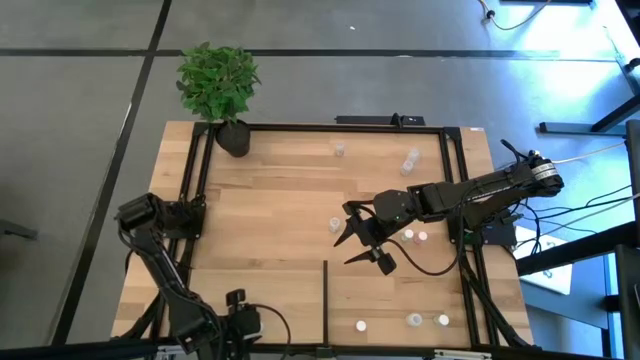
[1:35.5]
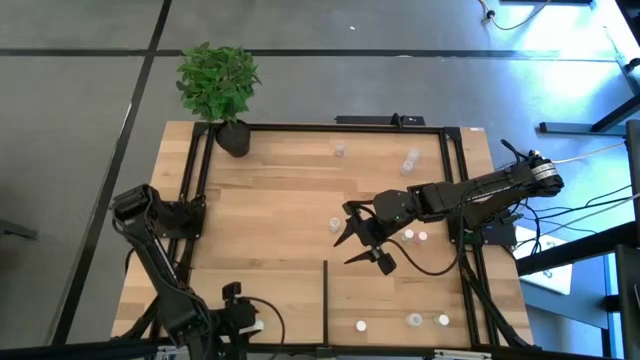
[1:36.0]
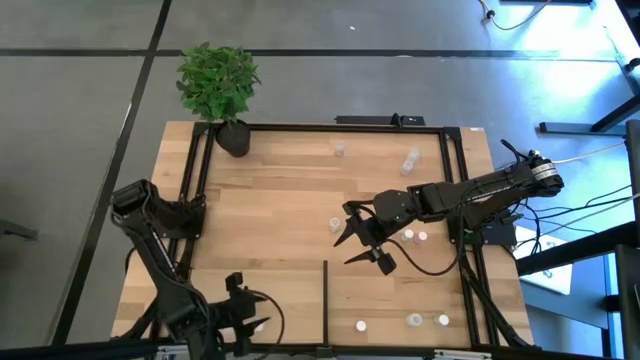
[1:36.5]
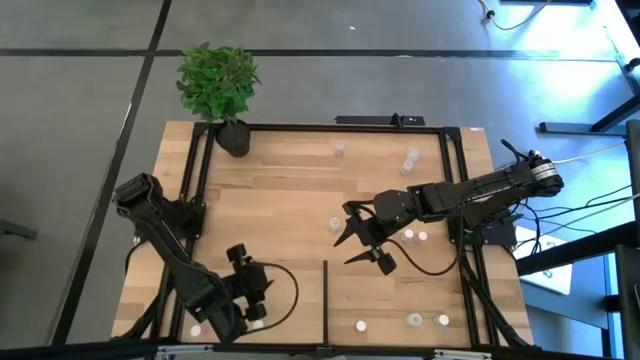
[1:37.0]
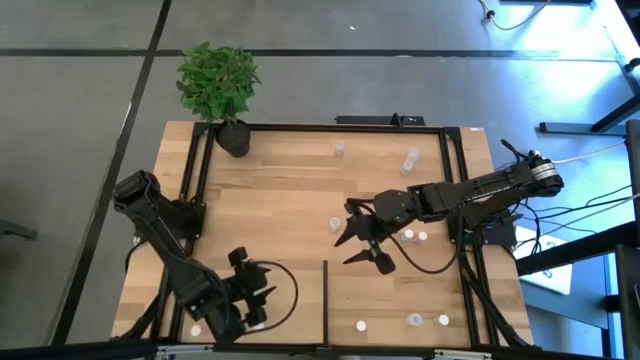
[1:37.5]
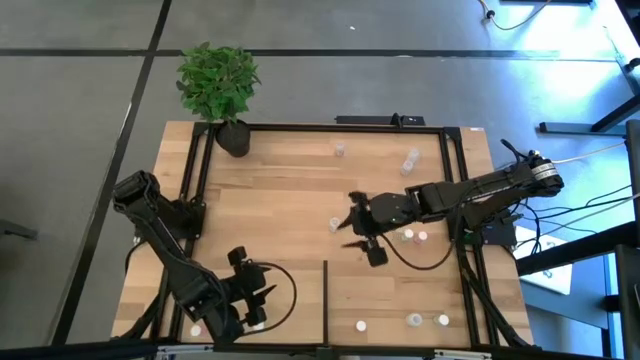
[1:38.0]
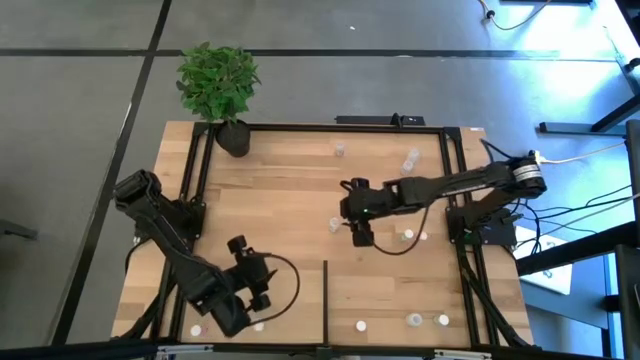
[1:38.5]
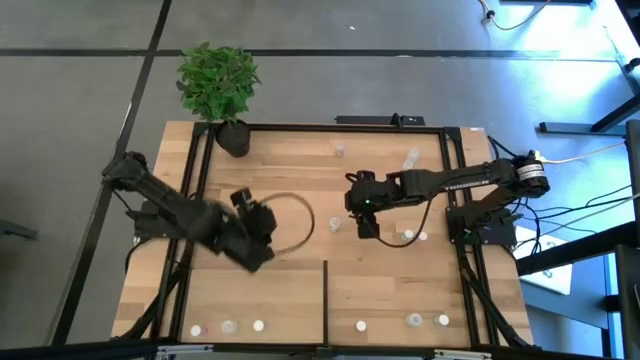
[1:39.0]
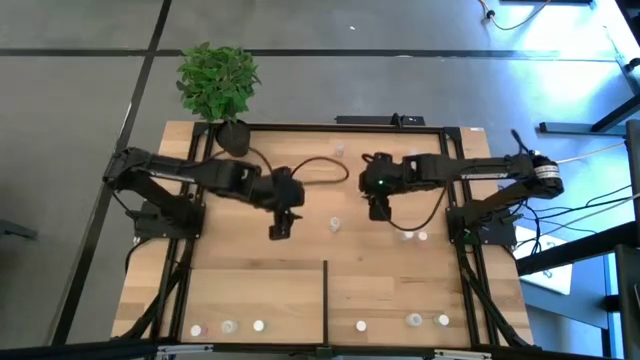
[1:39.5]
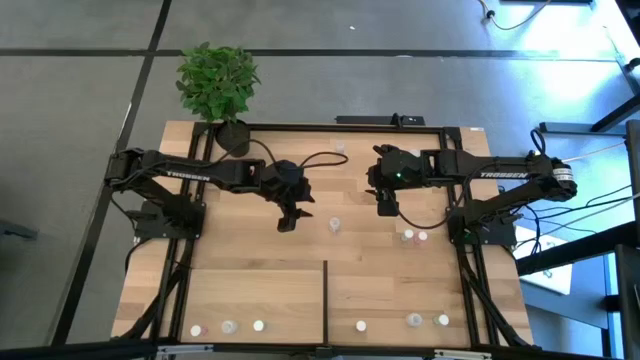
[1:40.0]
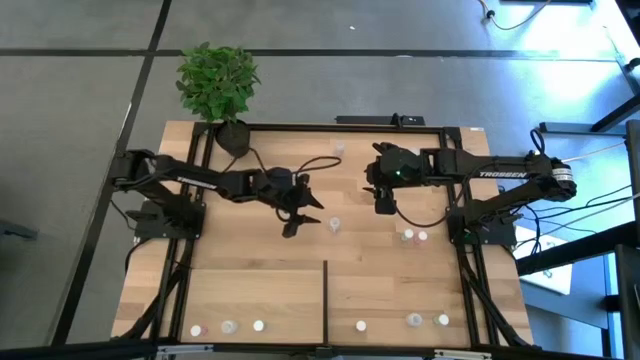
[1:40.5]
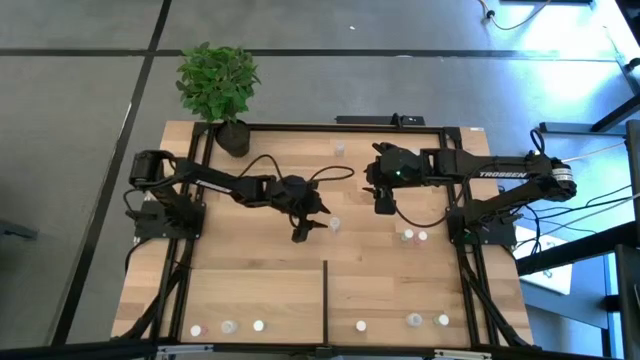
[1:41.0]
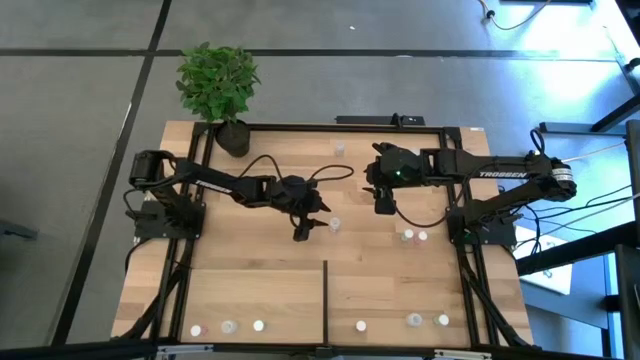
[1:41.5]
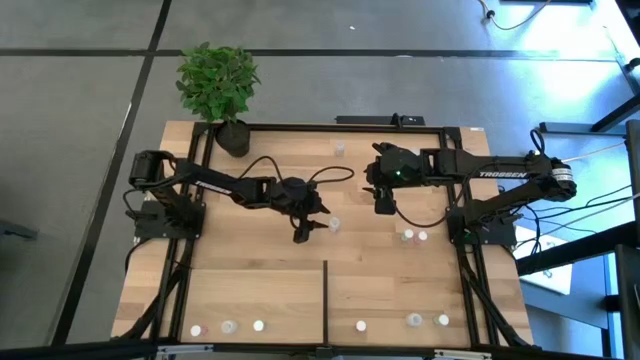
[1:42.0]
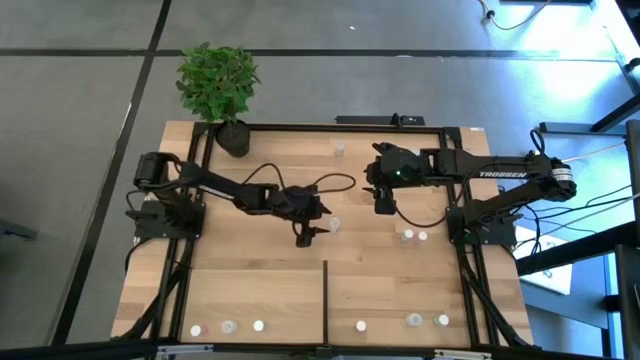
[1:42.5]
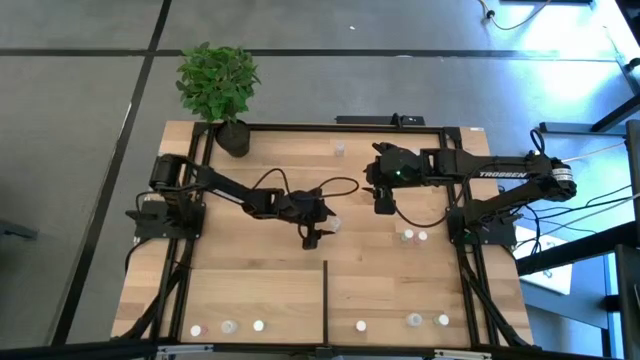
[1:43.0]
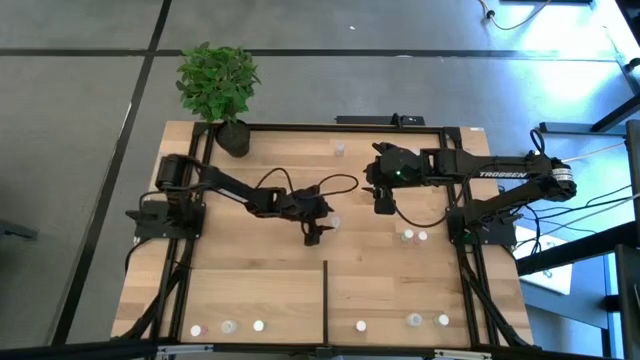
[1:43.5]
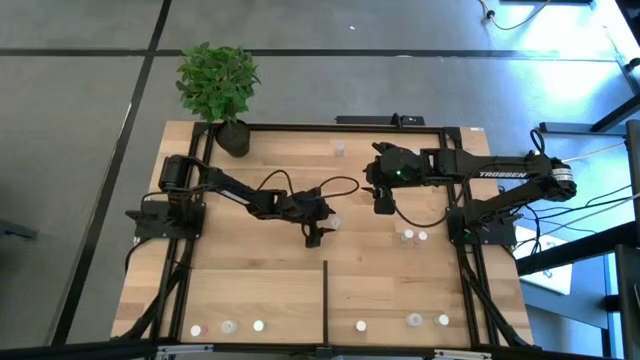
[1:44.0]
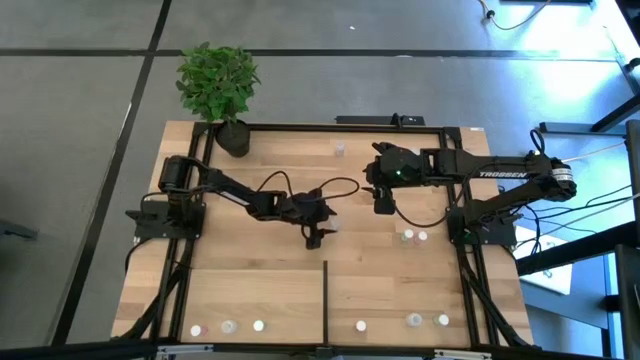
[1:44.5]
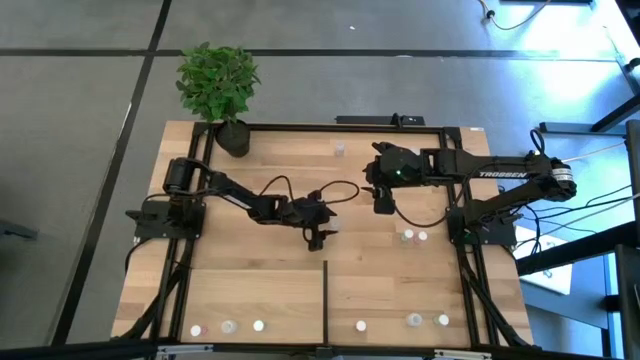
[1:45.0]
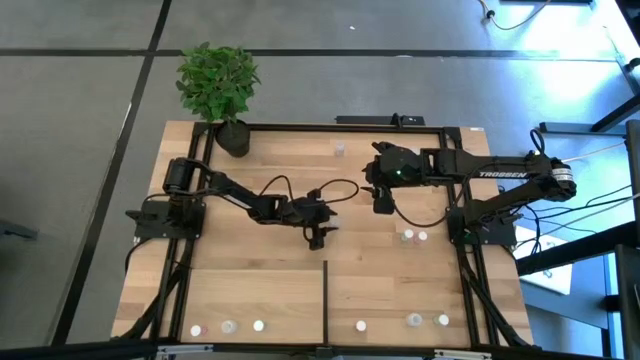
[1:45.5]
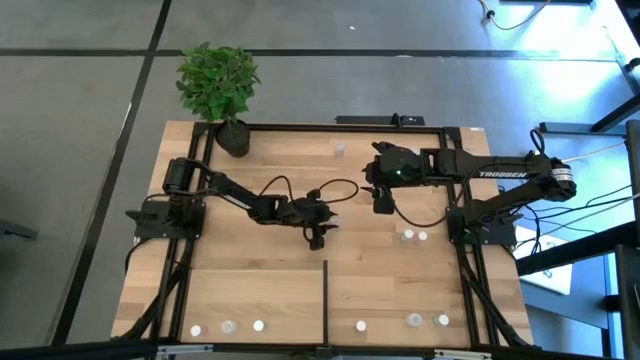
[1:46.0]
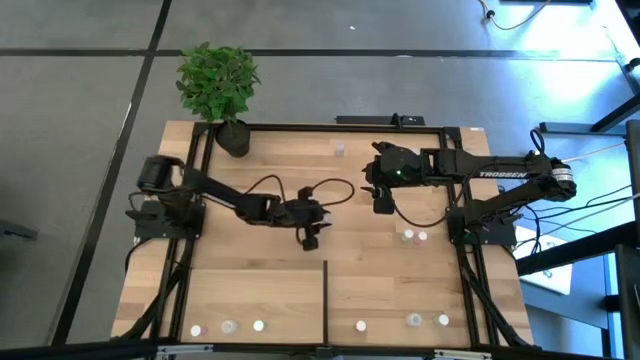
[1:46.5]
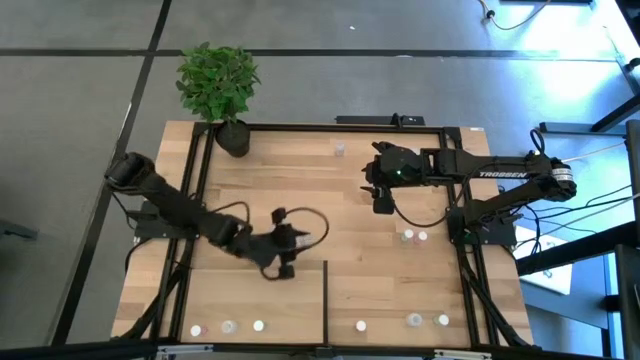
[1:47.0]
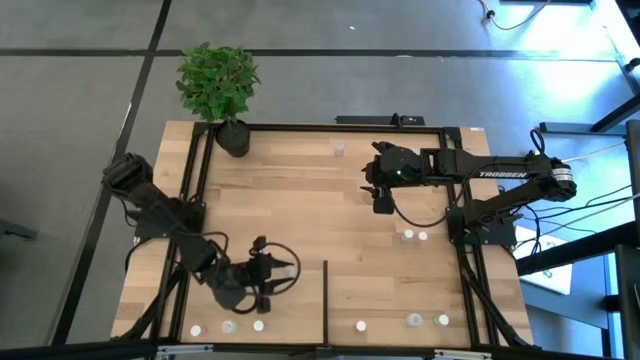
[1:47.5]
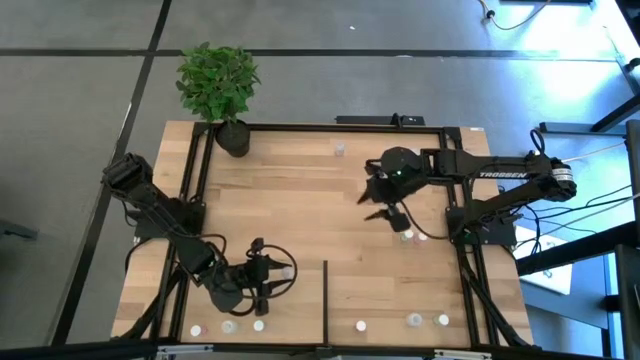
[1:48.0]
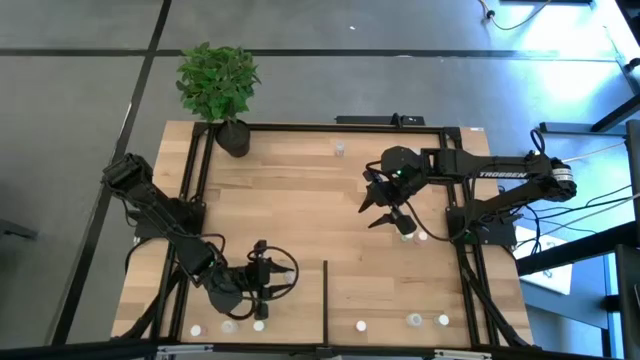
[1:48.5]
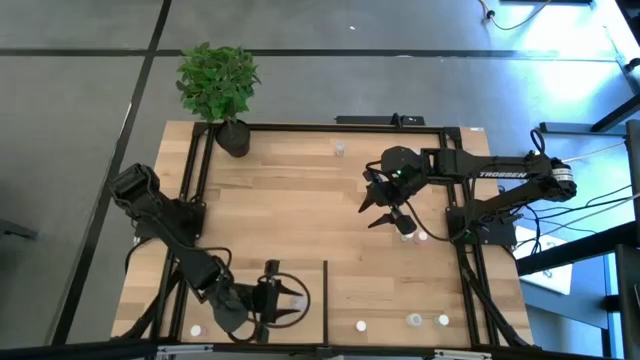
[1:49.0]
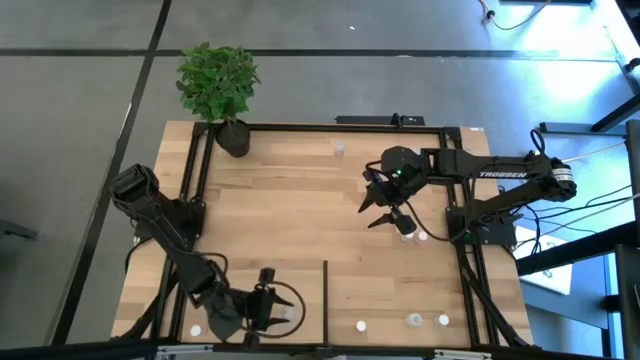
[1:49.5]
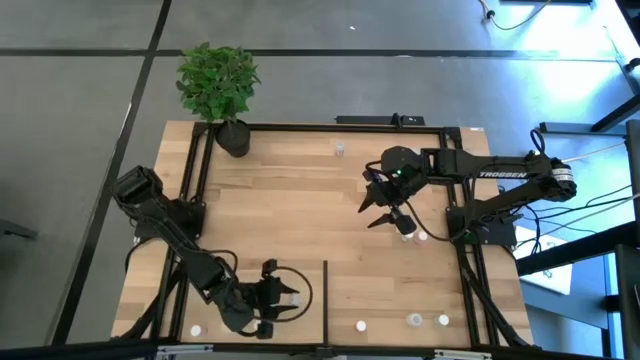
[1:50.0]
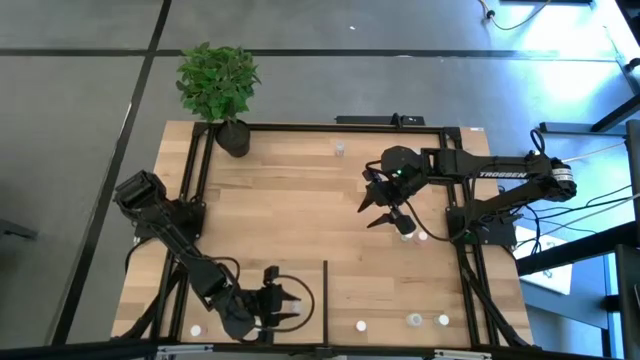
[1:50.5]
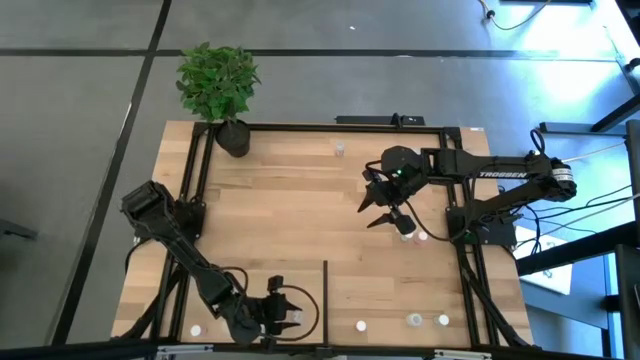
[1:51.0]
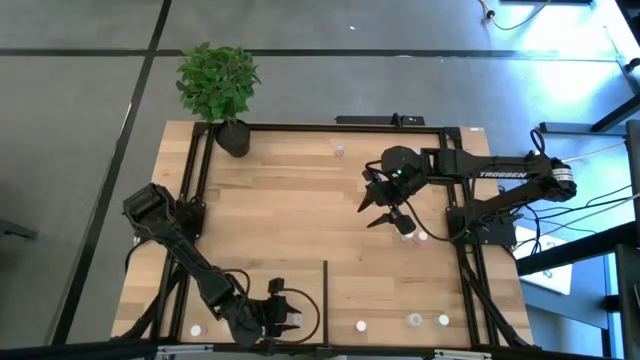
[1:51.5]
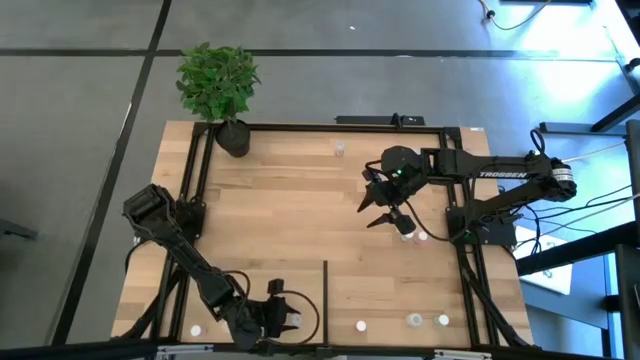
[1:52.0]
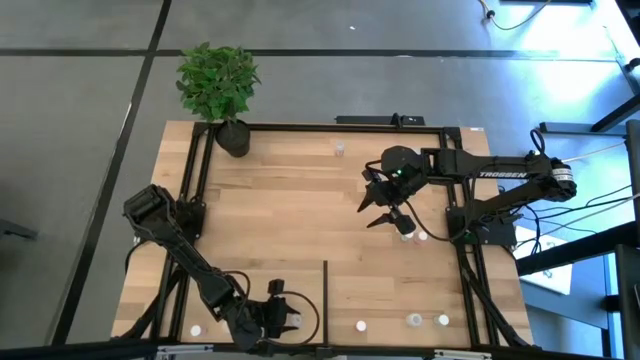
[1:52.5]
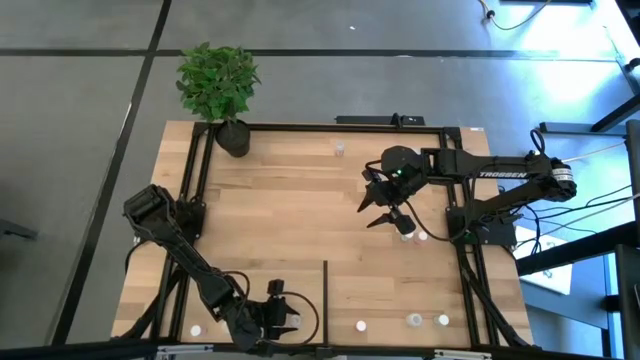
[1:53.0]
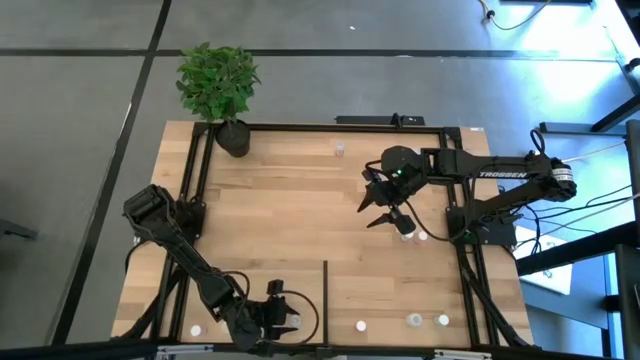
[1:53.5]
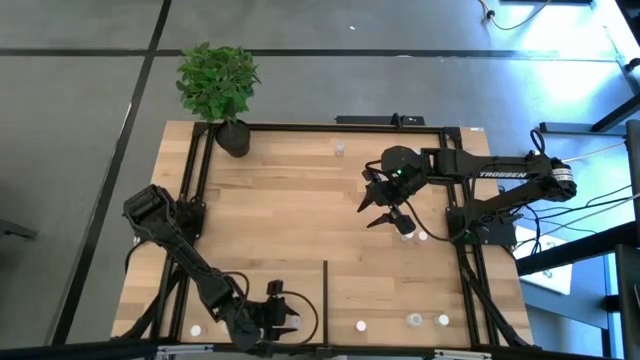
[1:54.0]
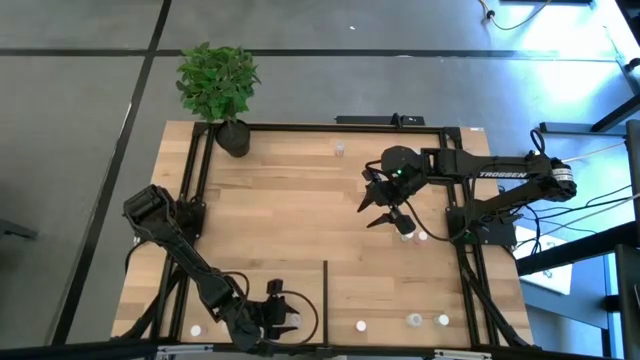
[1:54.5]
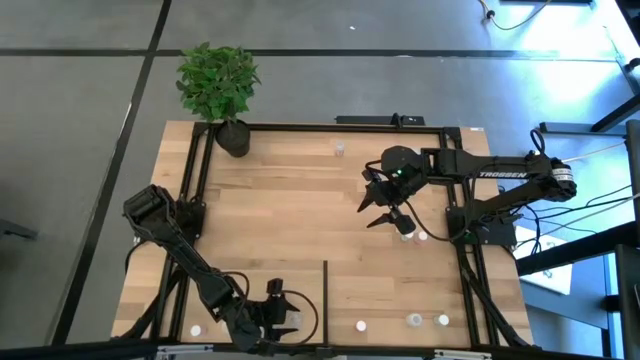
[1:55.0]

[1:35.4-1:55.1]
Task: Pick and place medicine bottles onto shelf by color
Put the bottom transparent pill bottle on the shelf
